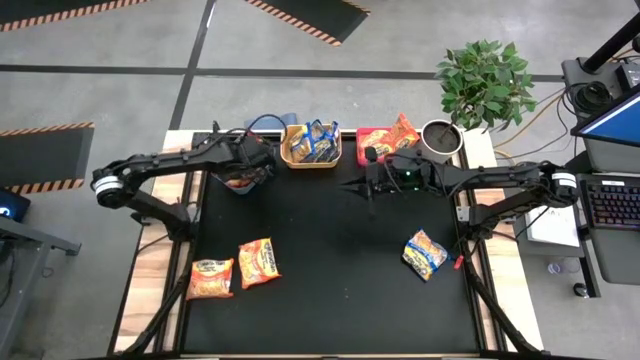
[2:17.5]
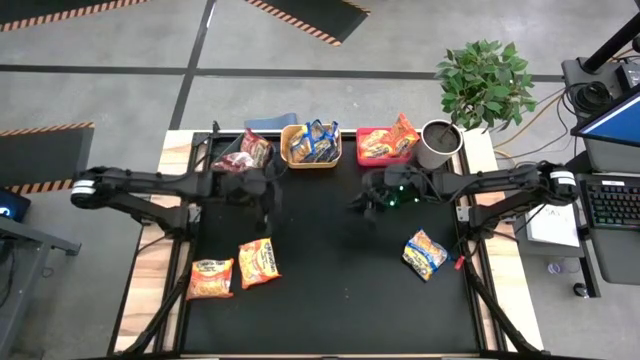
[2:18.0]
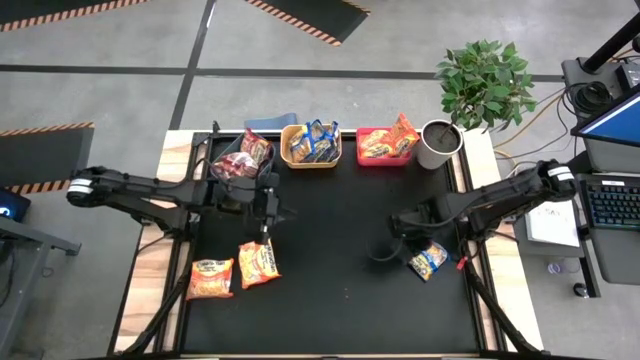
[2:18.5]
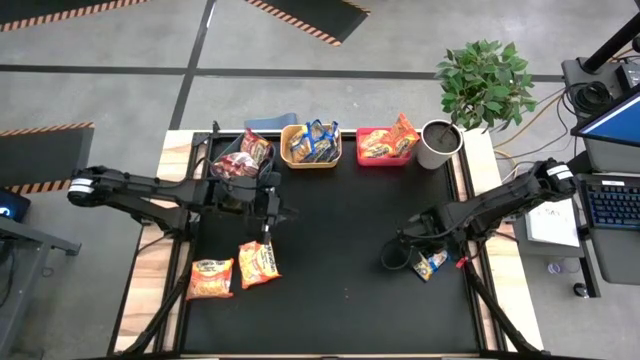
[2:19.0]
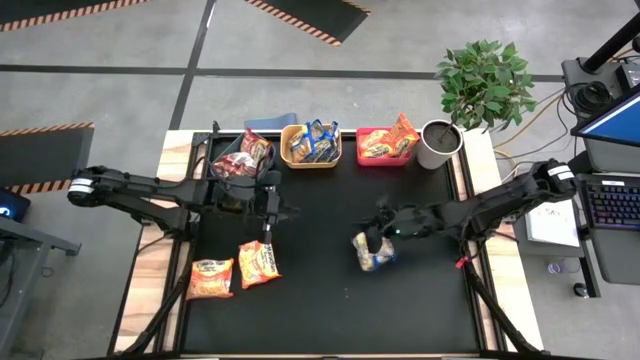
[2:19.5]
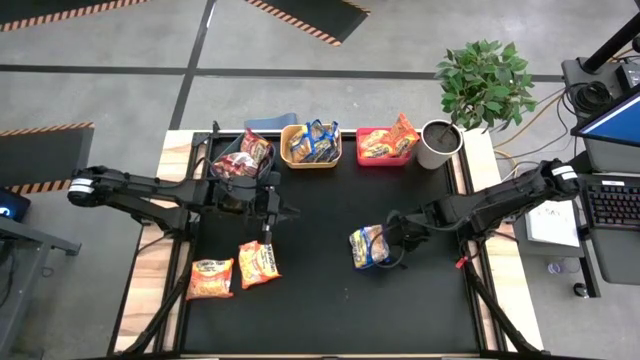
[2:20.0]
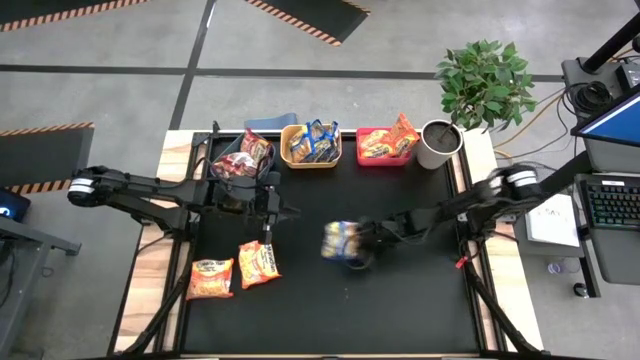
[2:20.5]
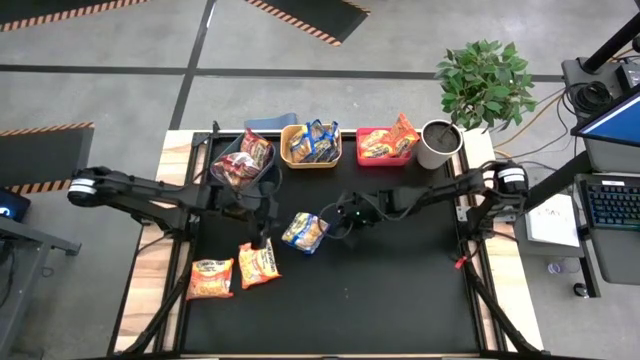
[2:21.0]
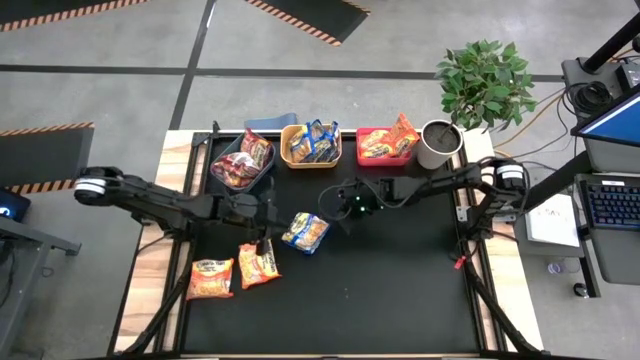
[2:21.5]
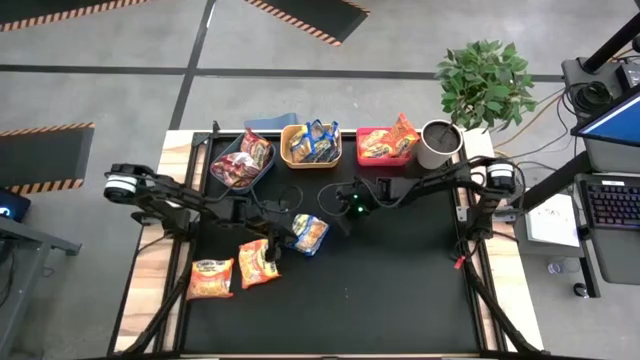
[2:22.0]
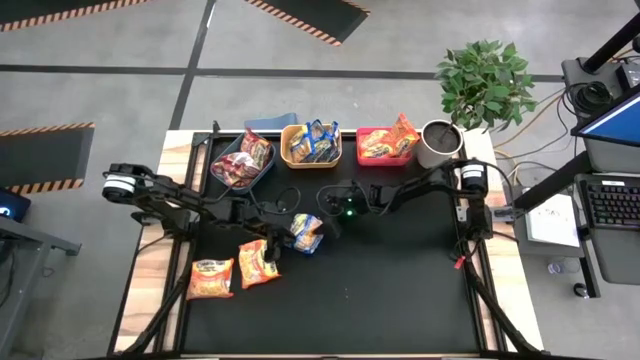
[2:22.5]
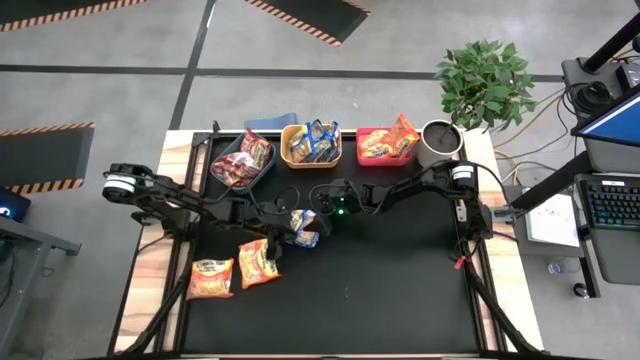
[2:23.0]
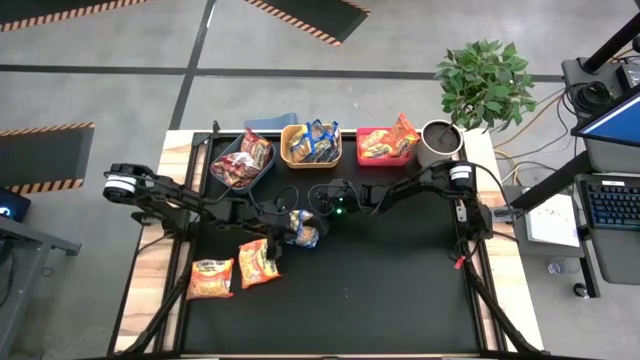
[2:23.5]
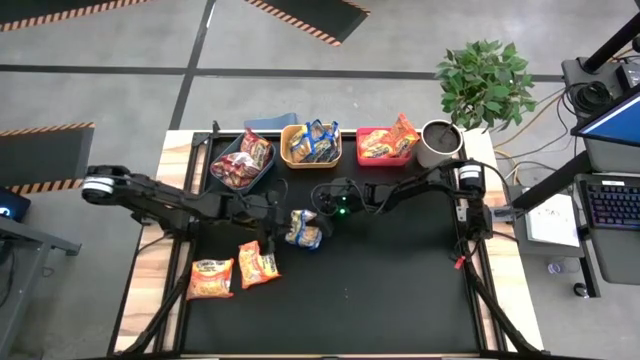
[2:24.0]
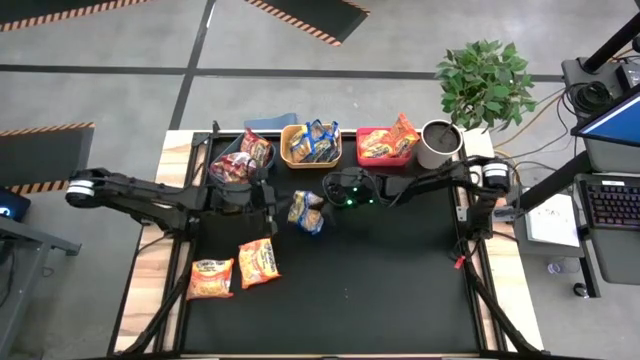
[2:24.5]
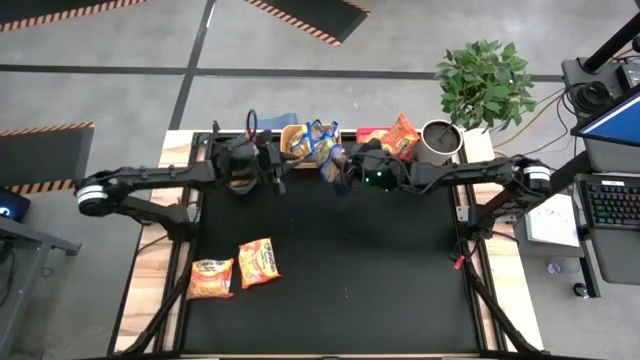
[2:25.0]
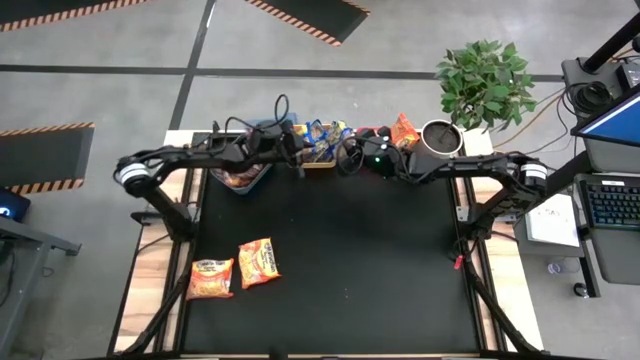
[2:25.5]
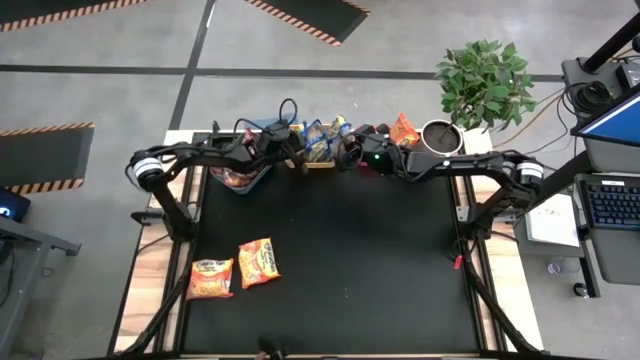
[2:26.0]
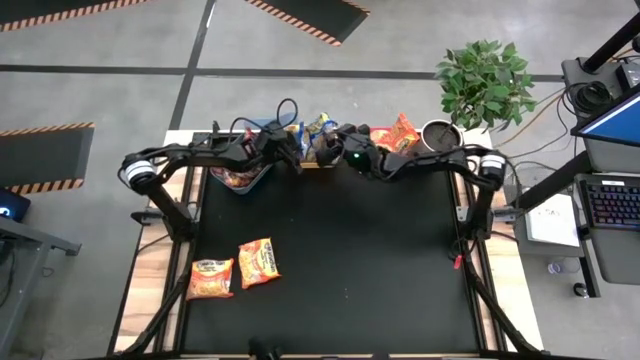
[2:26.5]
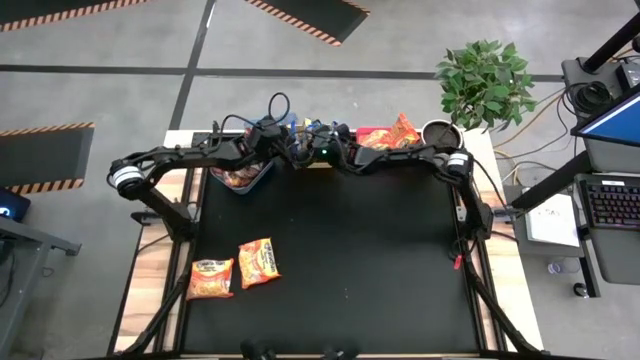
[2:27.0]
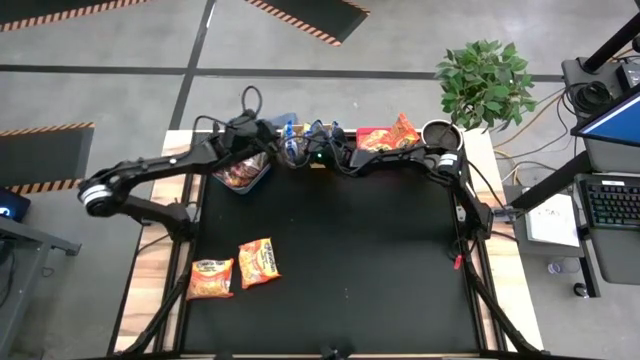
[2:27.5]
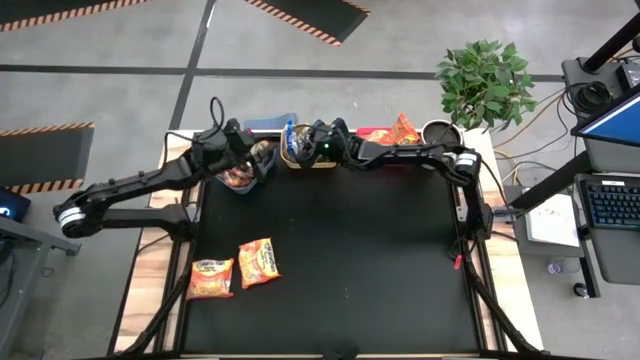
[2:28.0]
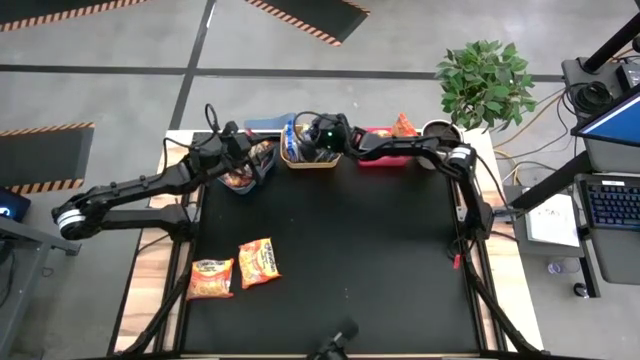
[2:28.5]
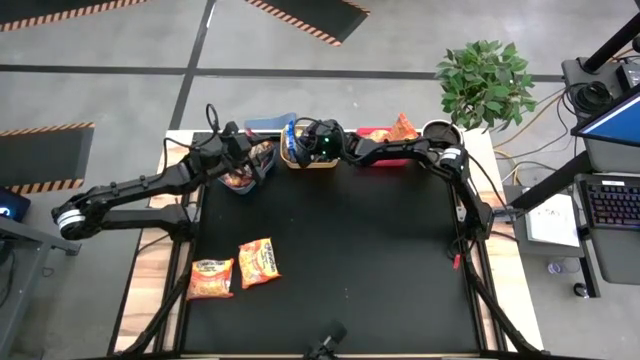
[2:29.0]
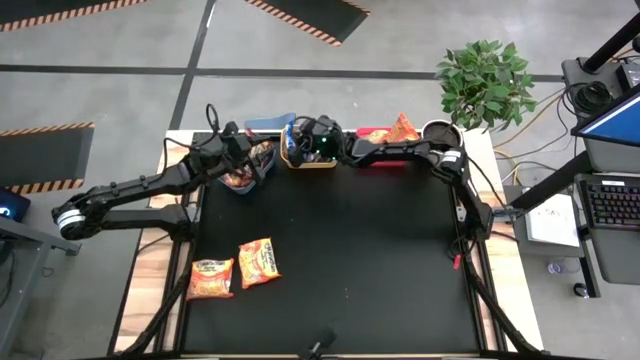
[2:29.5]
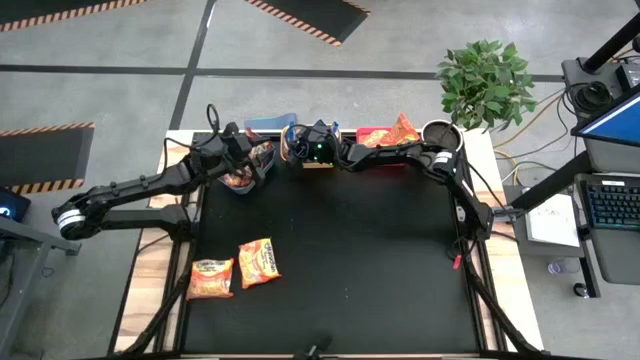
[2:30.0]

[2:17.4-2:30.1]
Task: Sort Maruchan noodles
Put the blue noodle pack into the yellow bin

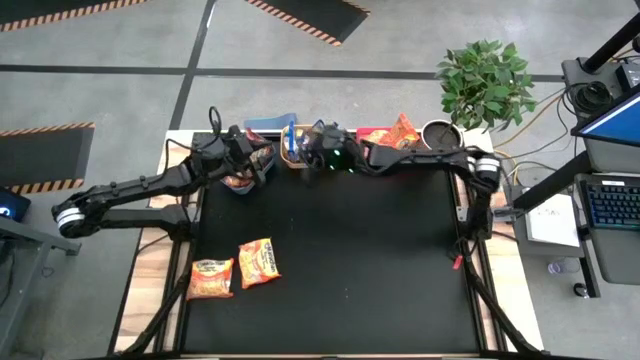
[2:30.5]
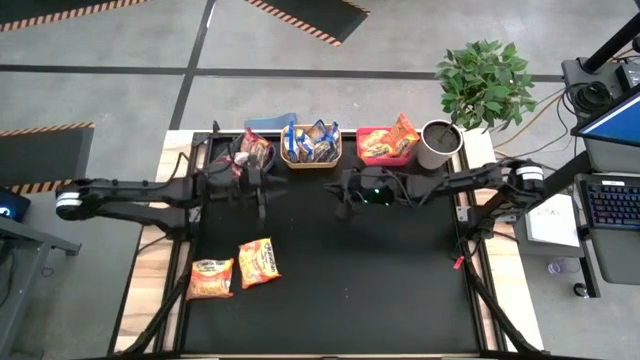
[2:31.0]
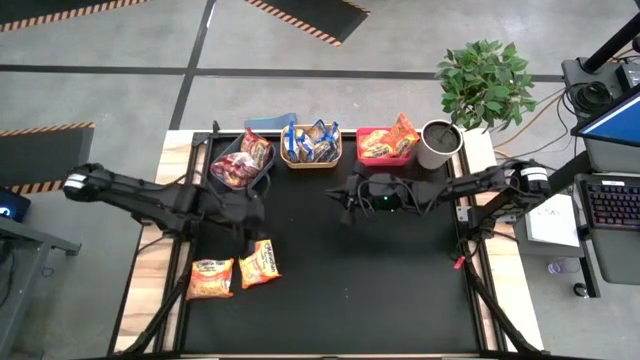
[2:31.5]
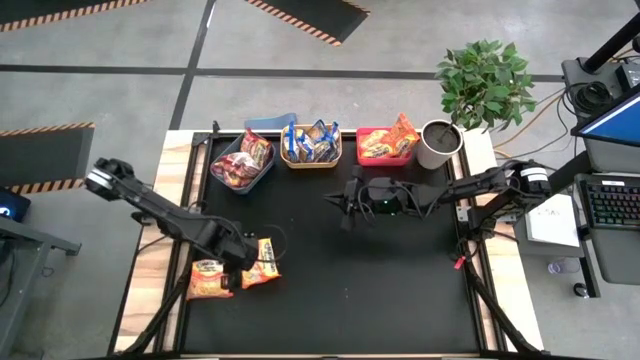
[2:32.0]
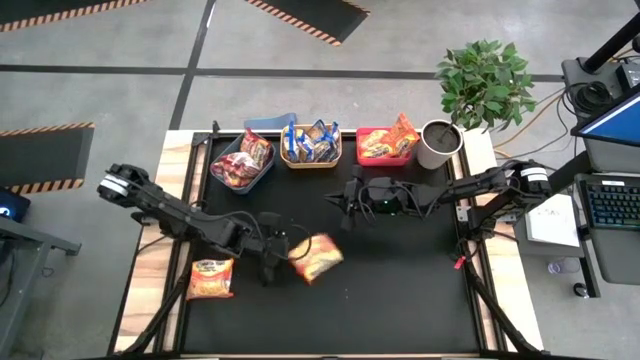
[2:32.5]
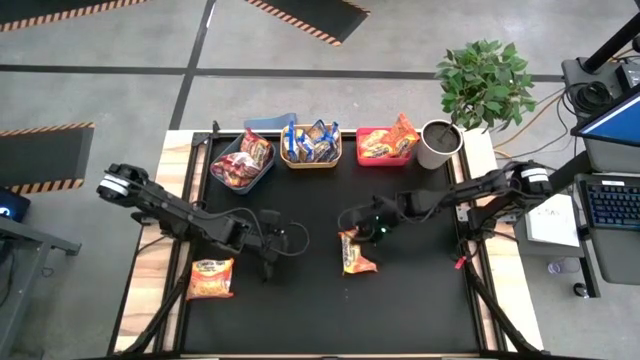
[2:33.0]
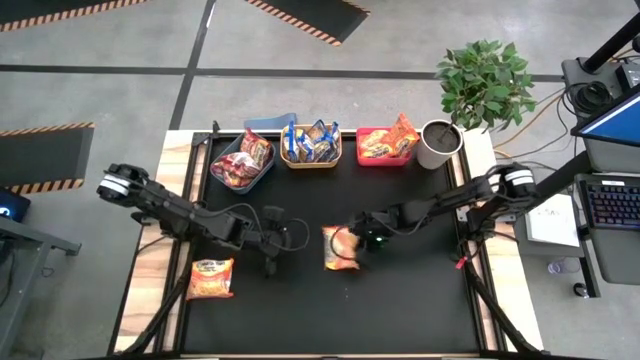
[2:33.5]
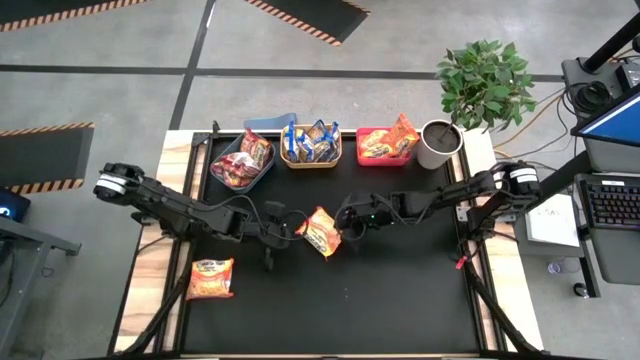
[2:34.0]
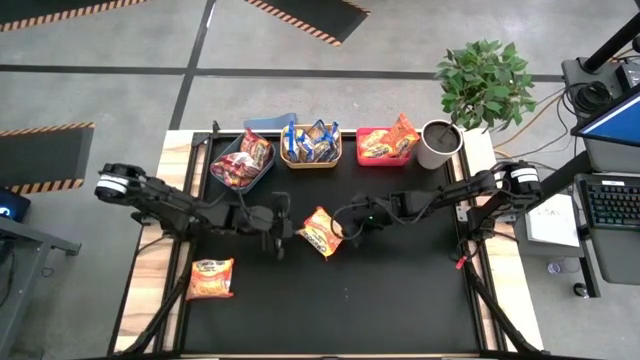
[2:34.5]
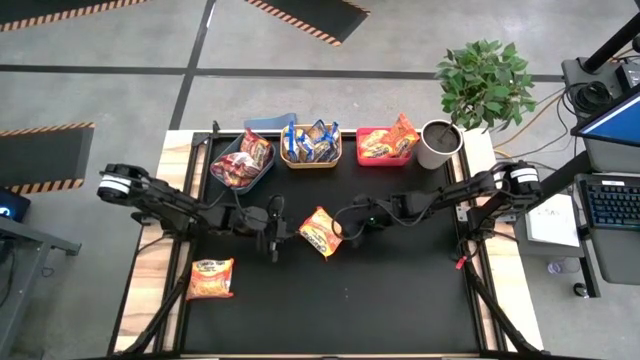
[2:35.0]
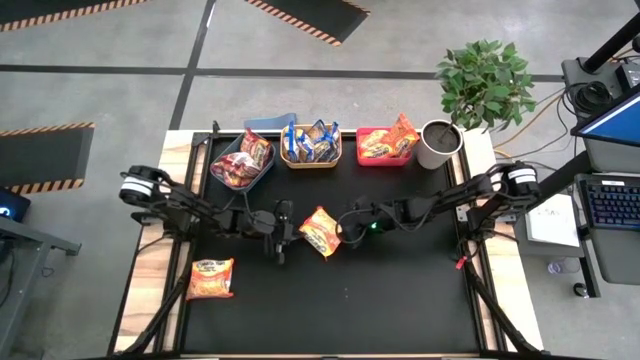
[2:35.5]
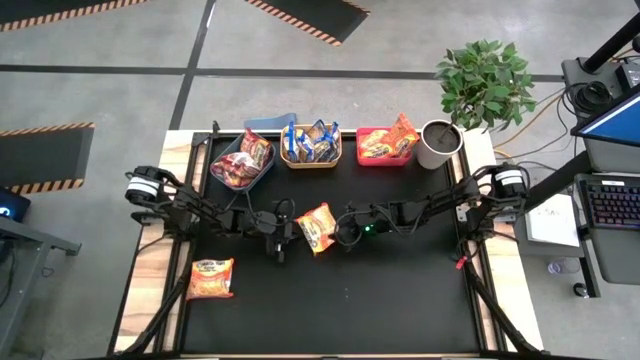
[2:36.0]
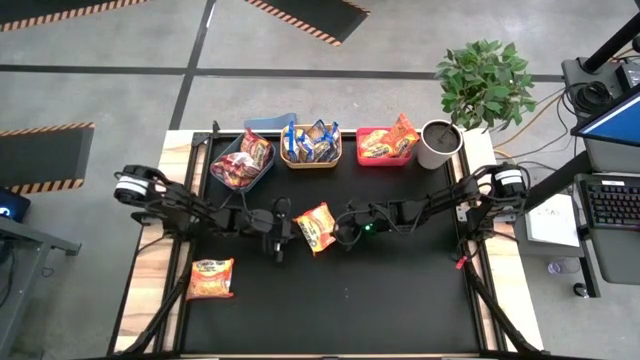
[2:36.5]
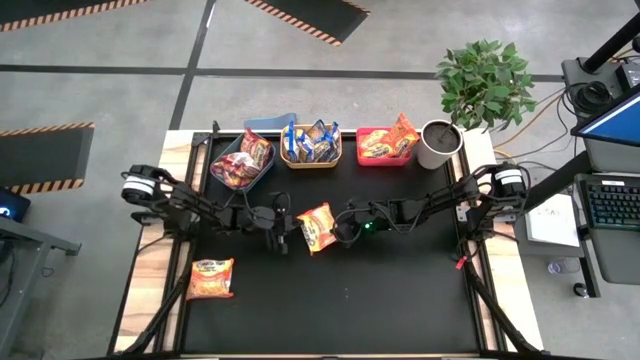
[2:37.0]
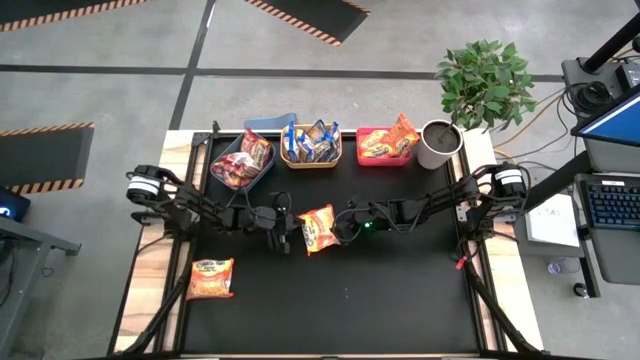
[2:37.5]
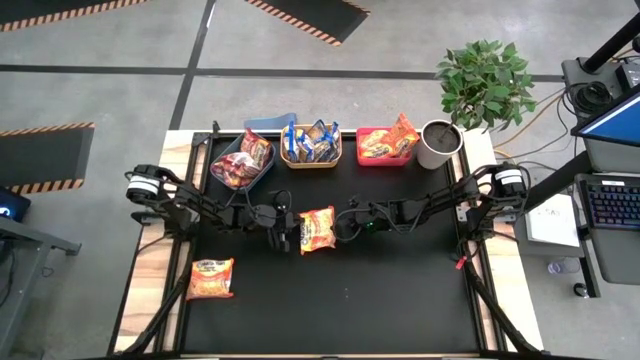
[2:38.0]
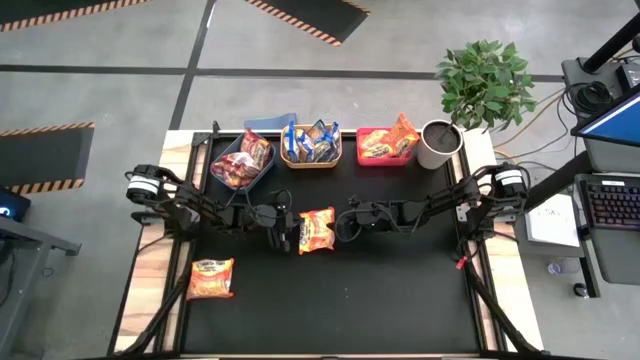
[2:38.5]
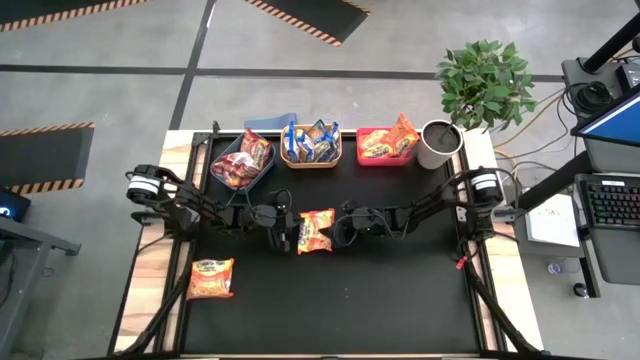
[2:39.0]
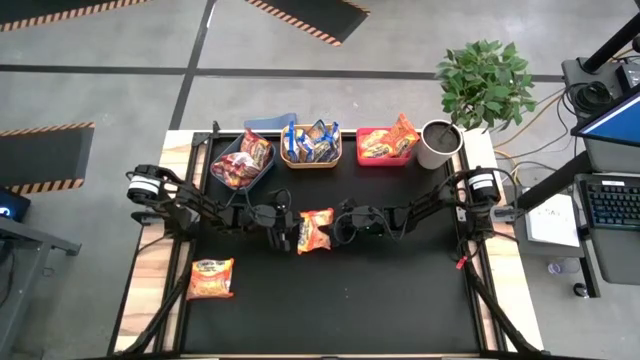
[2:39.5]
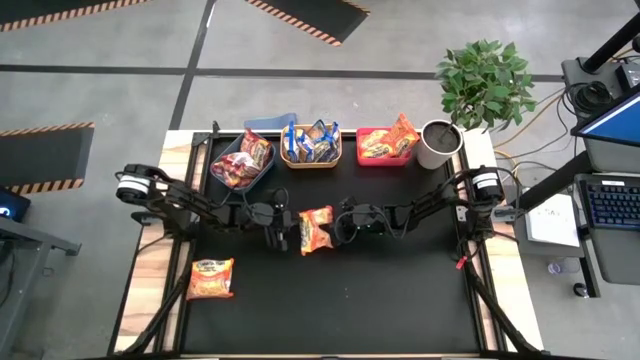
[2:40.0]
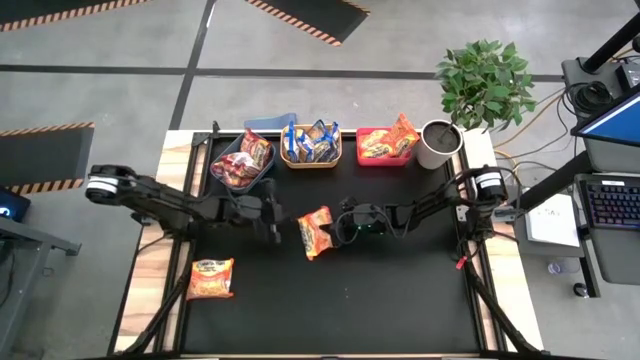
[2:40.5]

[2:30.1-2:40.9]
Put the orange noodle pack into the red bin
